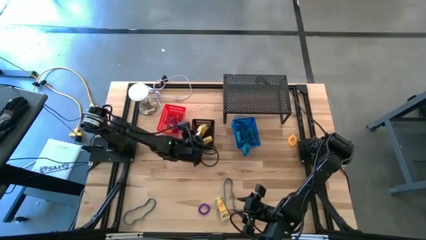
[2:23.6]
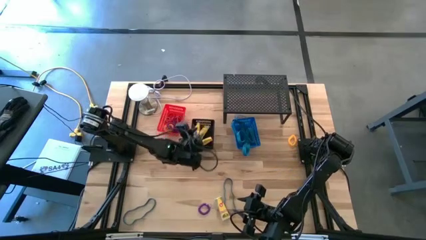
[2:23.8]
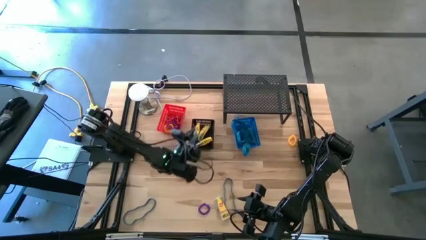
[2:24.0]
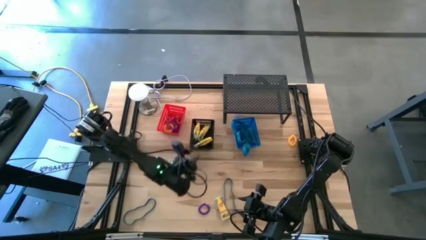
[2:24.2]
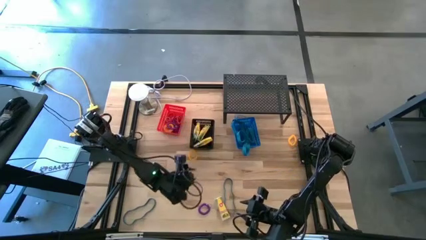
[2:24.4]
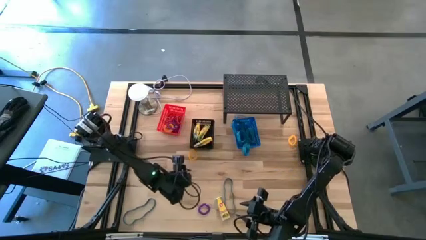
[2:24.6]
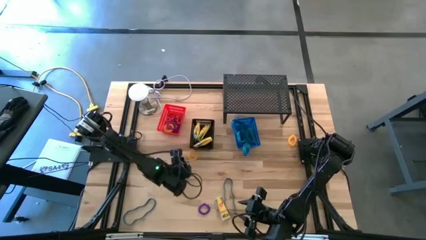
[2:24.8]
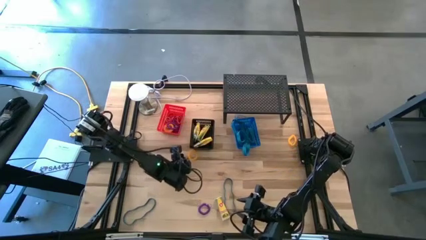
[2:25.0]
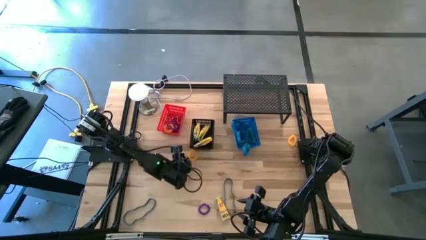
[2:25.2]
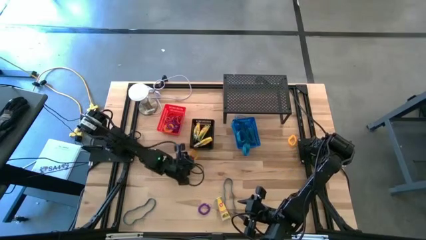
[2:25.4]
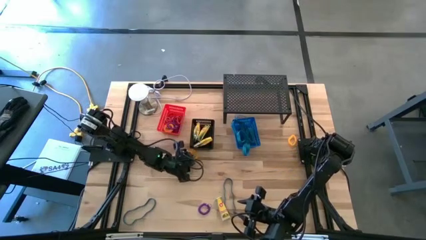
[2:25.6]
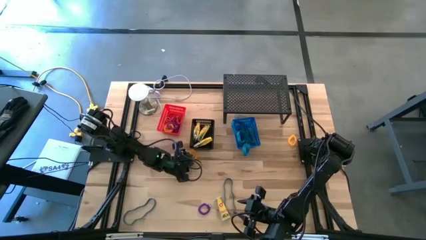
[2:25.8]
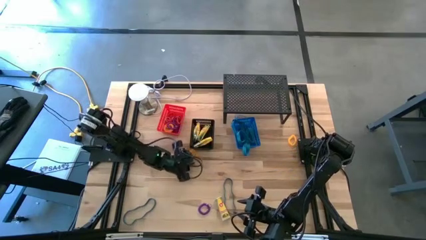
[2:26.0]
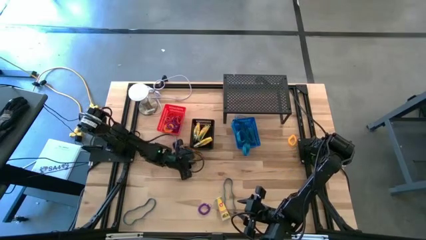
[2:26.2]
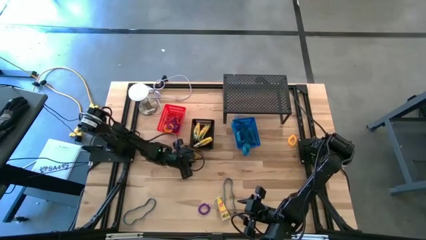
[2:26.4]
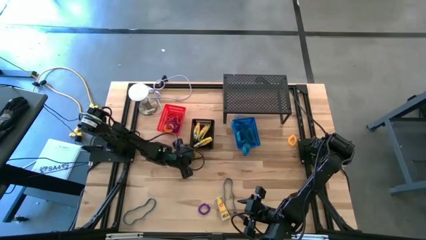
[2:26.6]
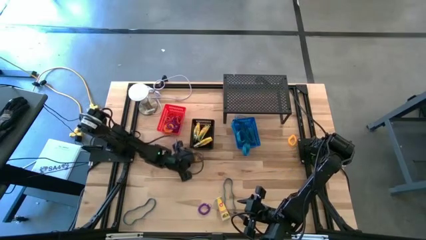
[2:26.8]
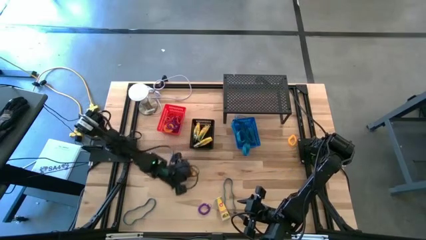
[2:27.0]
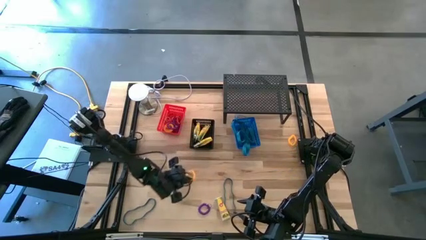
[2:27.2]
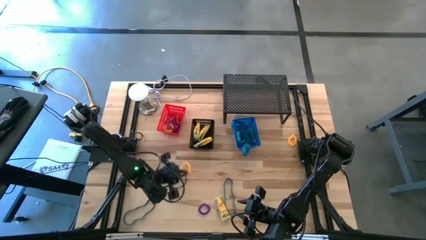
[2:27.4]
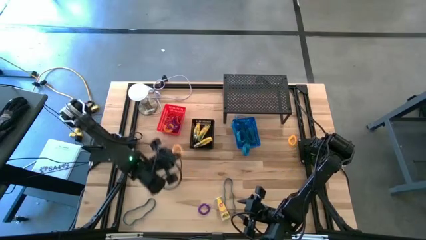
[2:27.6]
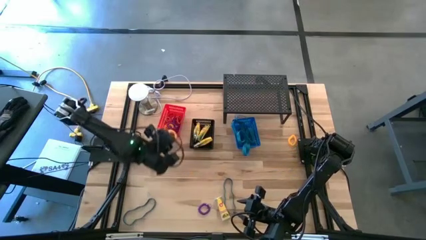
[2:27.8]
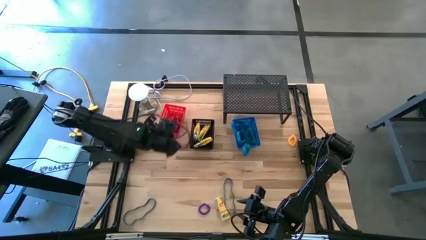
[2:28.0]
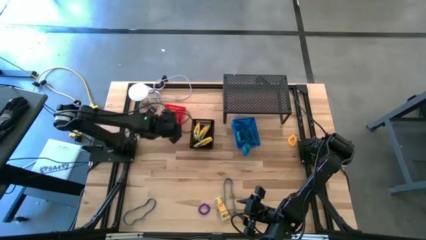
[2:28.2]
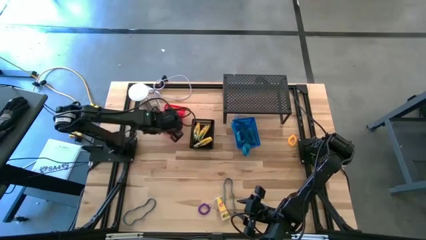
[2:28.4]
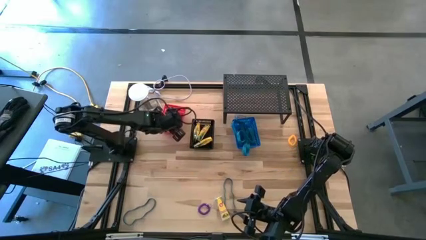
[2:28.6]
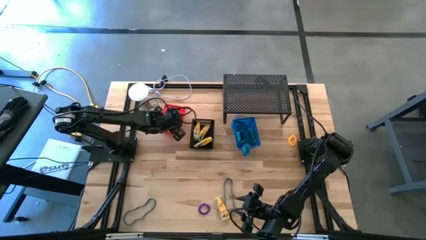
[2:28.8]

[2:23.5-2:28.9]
Task: Pick & Place Office Desk Supplies
Put the yellow wrist coil keychain into the orange bin

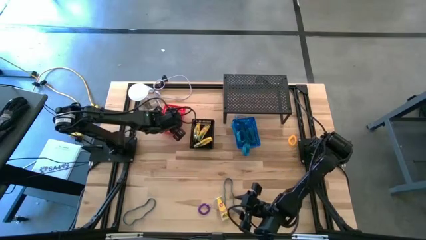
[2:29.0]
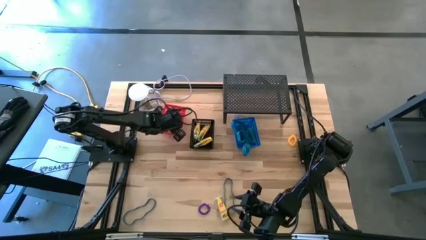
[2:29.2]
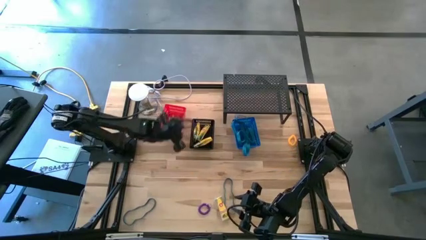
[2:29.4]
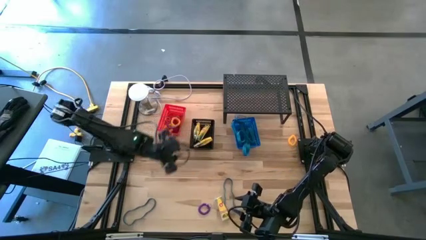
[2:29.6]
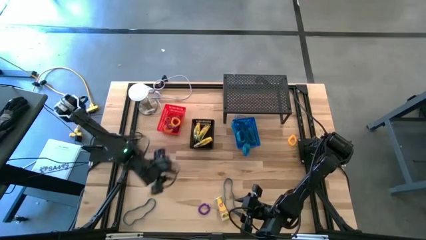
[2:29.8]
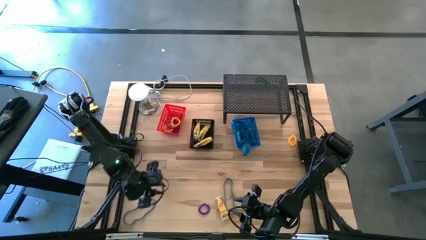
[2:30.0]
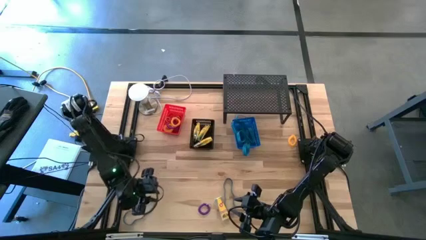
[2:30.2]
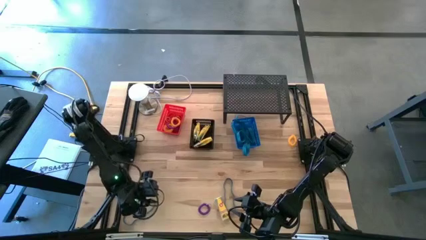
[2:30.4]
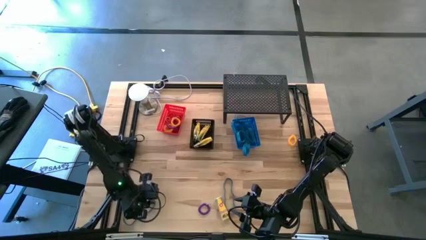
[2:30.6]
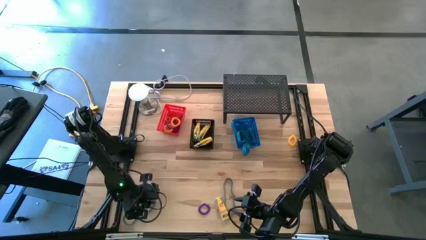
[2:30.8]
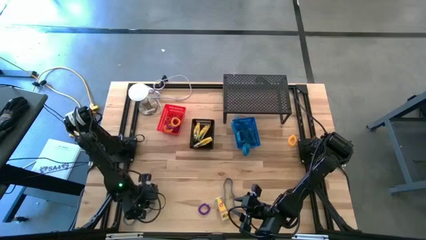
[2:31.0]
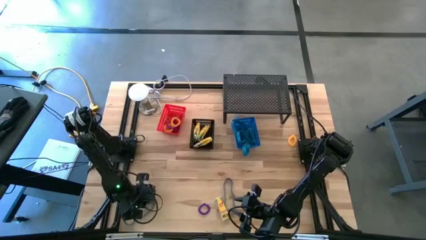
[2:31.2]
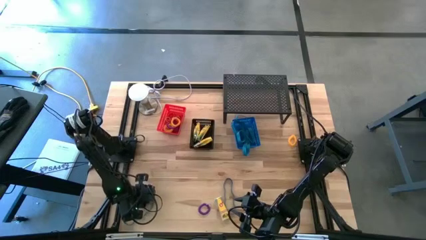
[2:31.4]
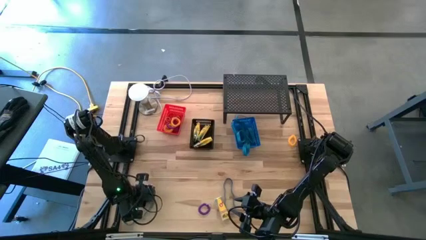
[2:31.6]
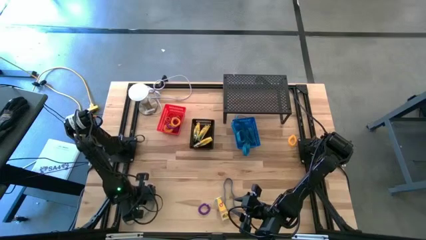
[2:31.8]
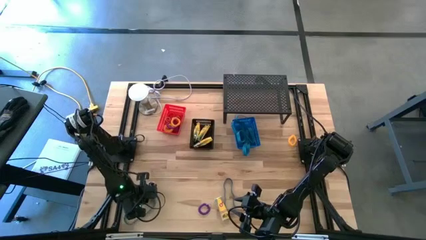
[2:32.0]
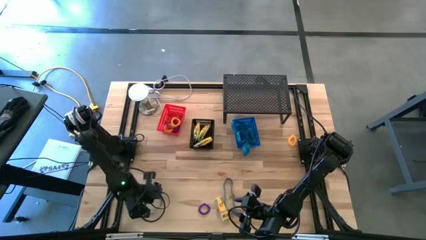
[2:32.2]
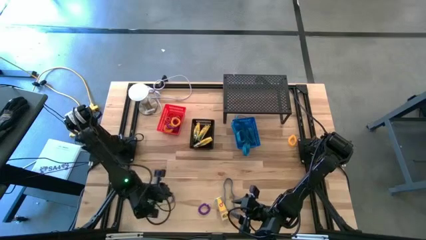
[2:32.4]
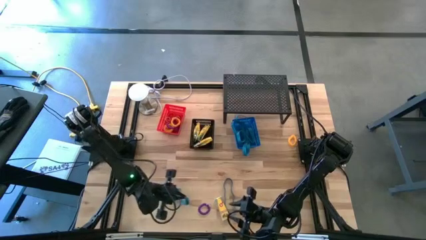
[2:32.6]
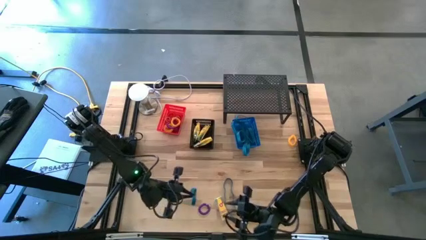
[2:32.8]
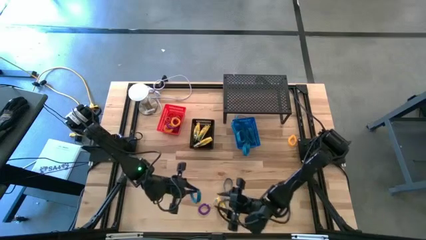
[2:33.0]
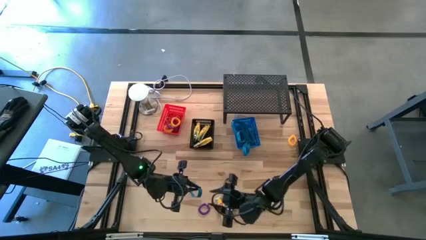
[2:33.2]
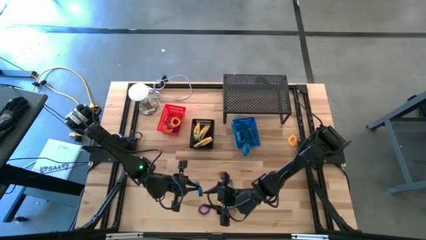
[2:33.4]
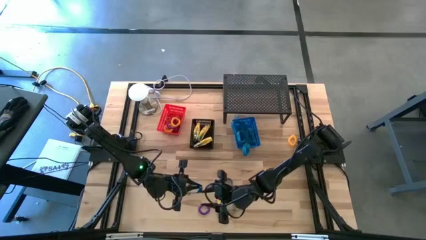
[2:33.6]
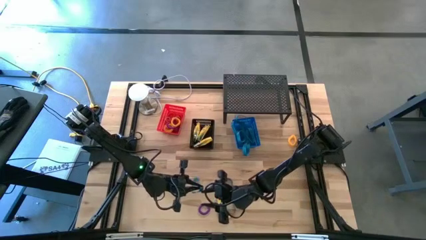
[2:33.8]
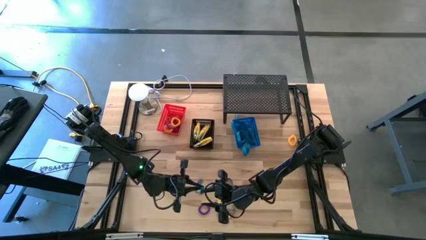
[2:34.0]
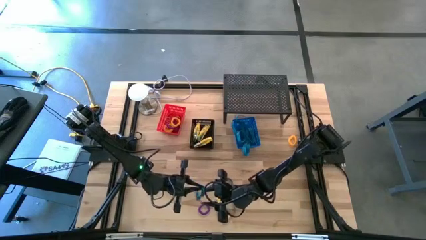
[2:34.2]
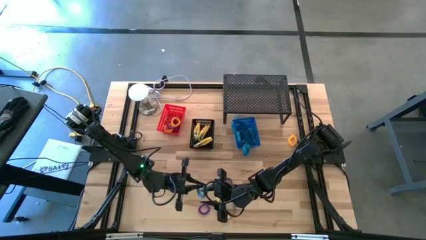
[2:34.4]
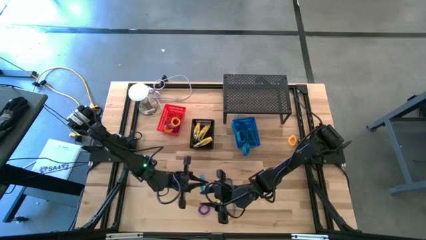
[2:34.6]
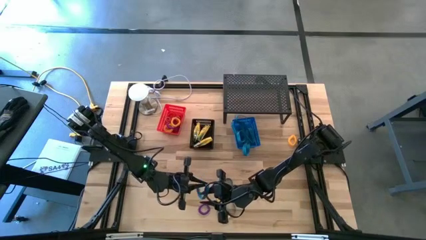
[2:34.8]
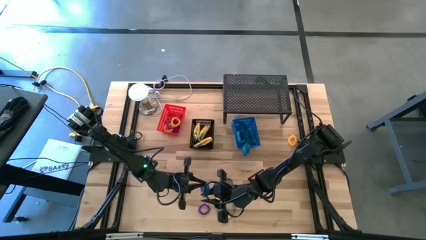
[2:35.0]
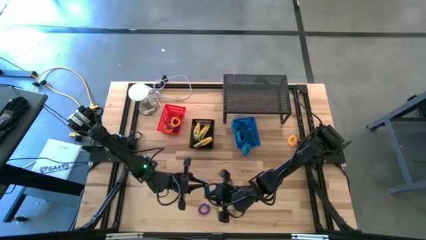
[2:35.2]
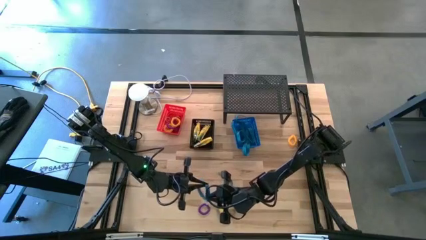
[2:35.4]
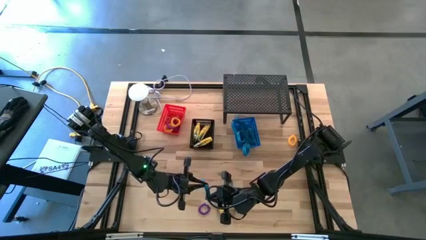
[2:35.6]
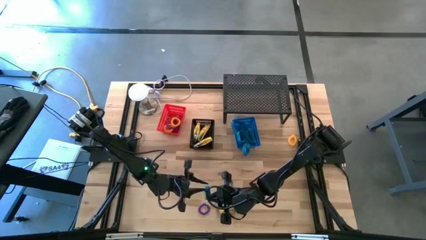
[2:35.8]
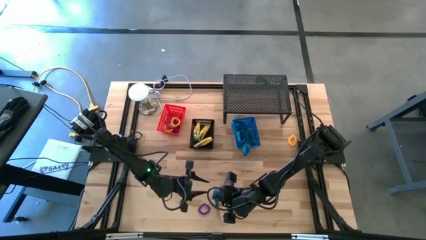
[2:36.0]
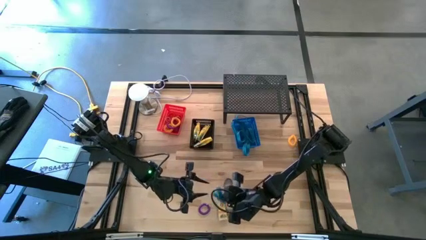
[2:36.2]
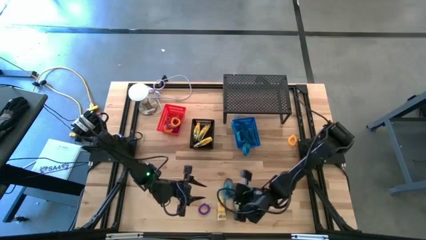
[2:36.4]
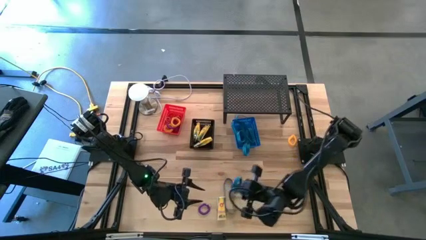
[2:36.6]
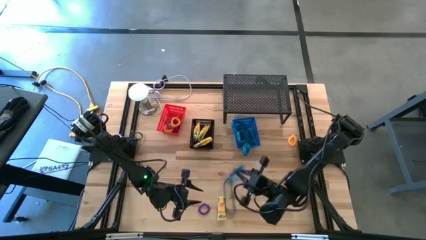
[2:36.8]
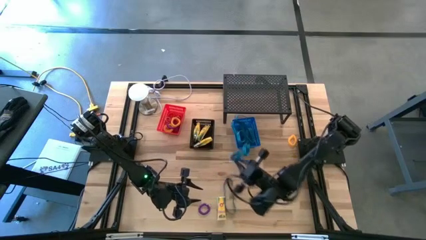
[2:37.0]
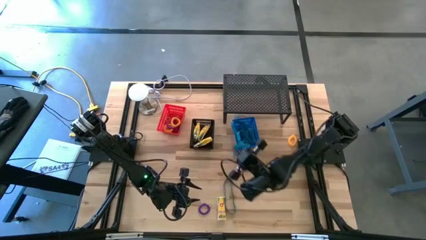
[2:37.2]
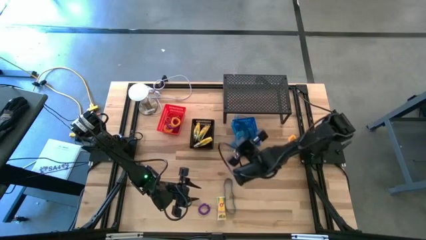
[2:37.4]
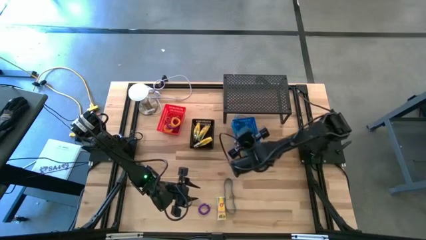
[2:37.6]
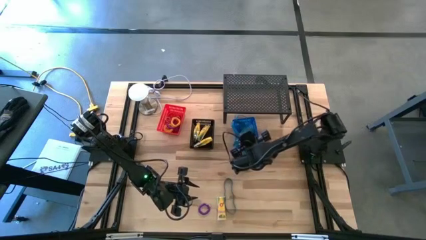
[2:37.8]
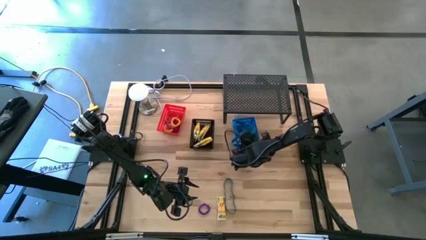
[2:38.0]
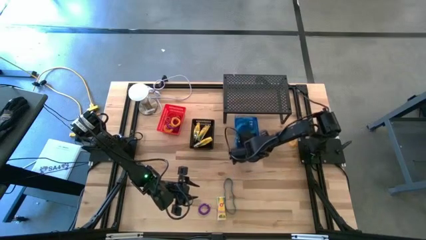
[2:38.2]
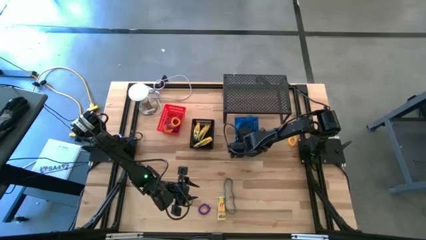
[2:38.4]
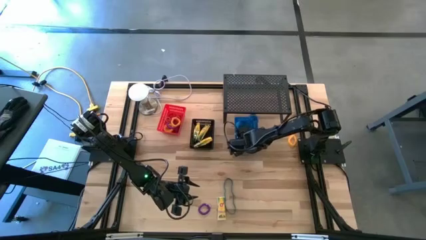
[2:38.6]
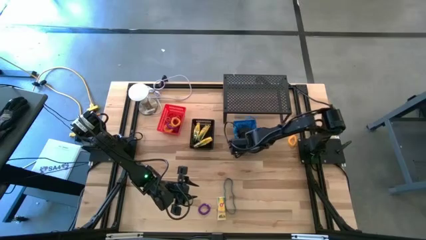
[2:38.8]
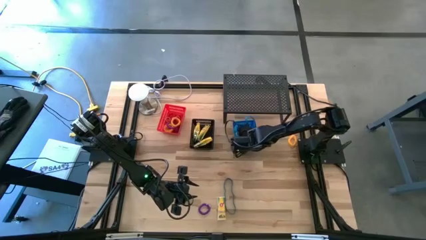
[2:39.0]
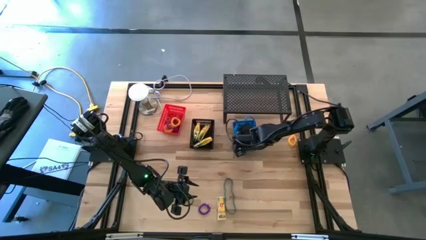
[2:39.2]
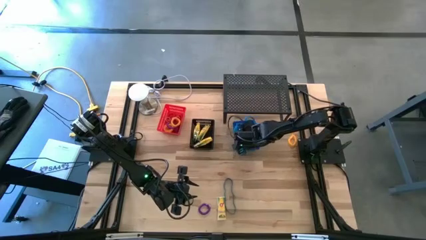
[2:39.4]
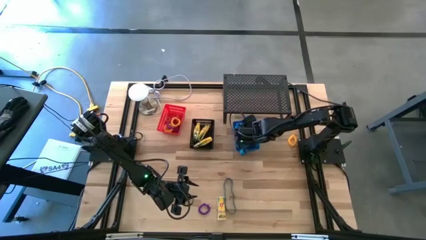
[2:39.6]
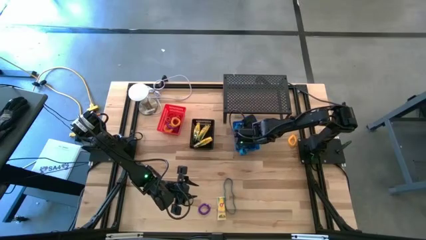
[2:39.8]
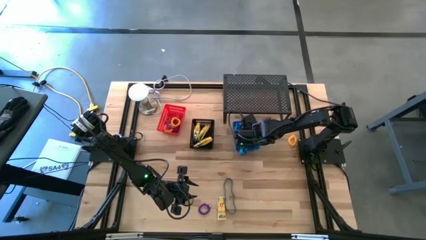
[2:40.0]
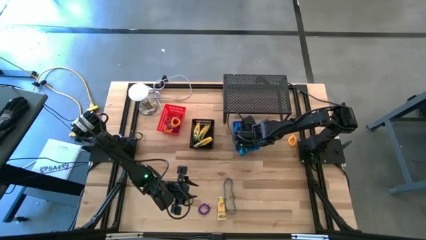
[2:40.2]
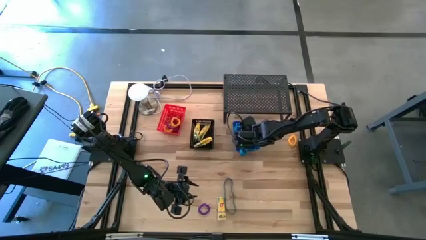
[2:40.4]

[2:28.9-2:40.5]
Put the blue rubber band into the blue bin
